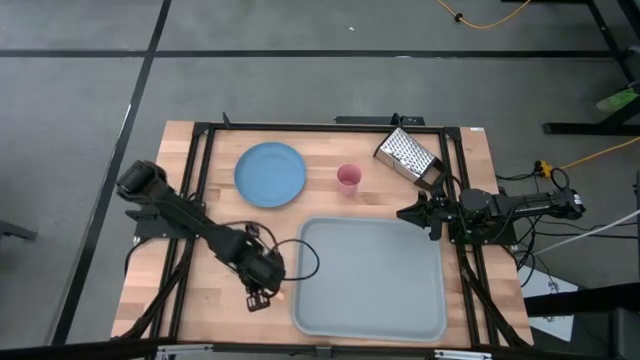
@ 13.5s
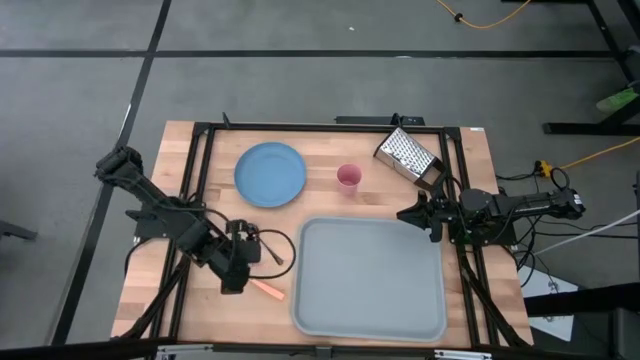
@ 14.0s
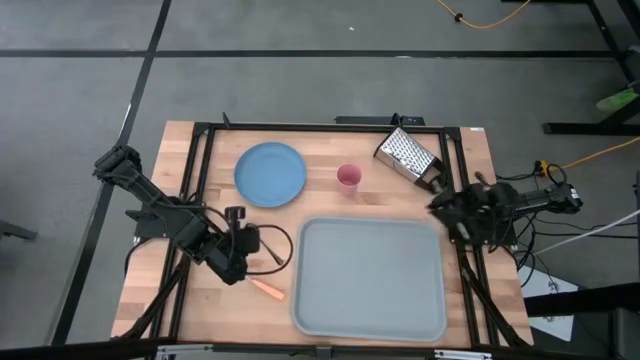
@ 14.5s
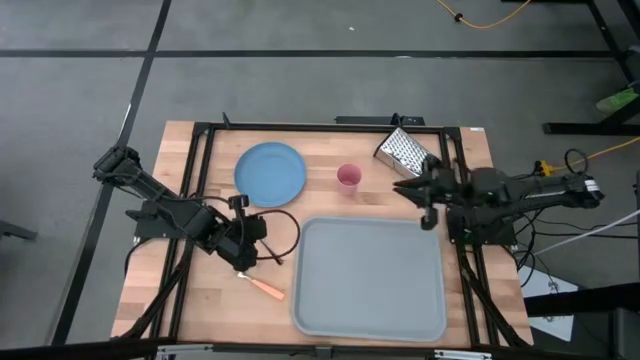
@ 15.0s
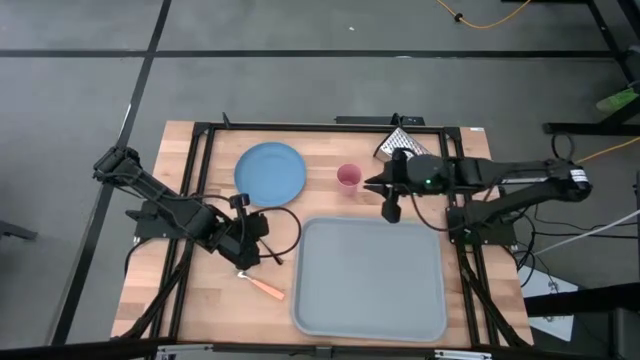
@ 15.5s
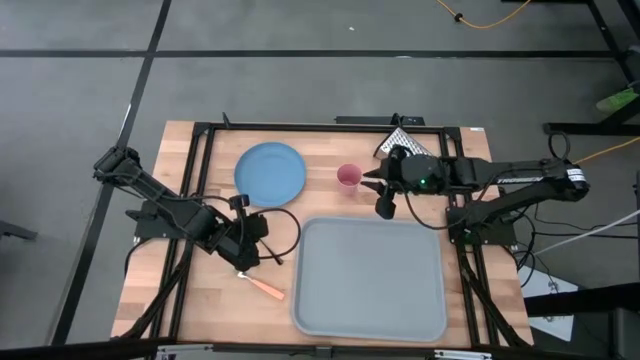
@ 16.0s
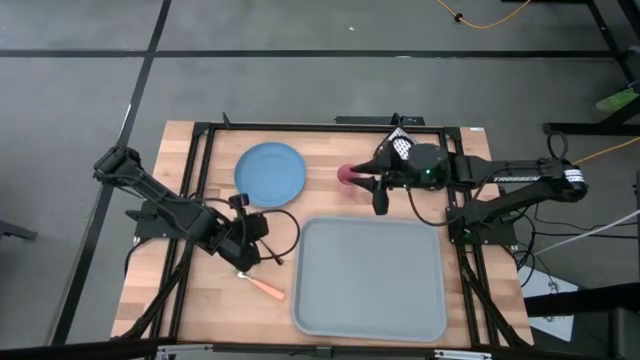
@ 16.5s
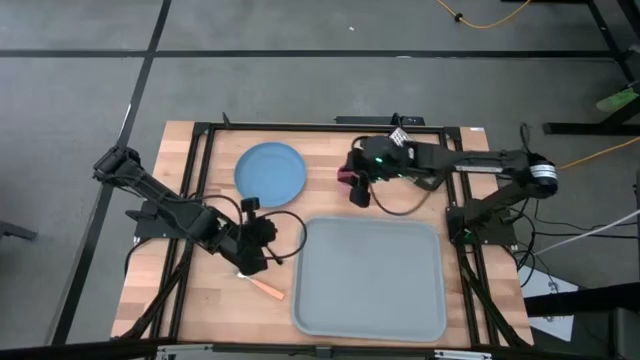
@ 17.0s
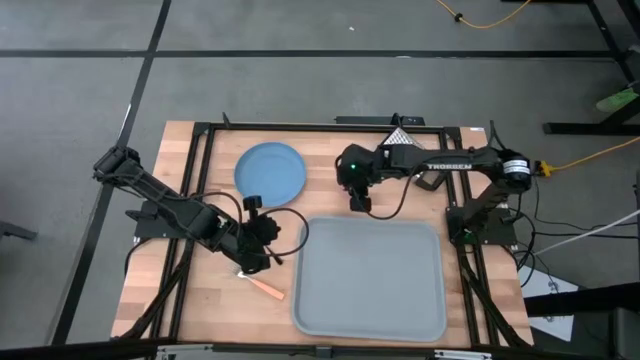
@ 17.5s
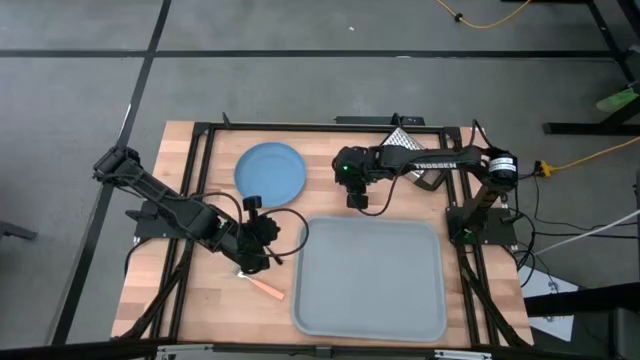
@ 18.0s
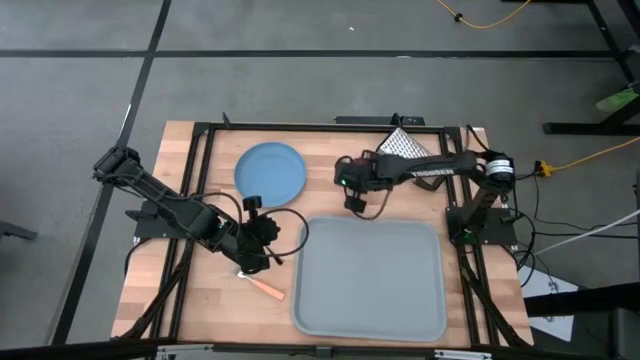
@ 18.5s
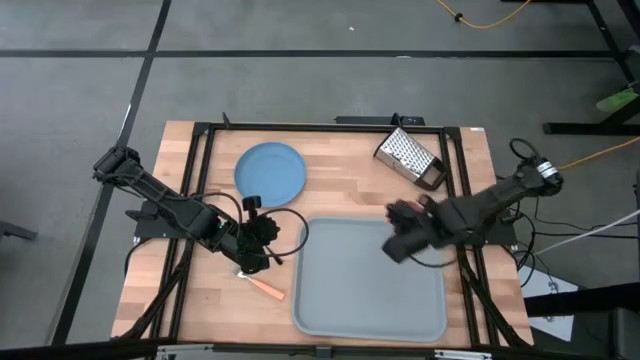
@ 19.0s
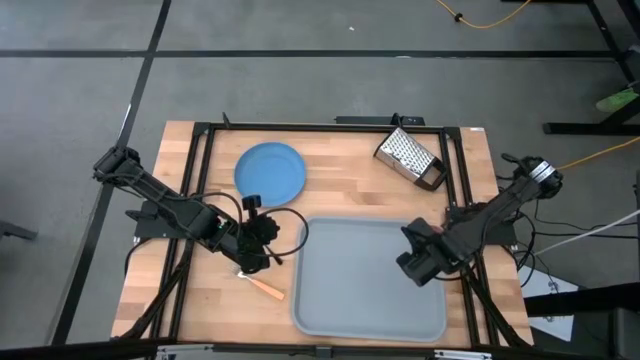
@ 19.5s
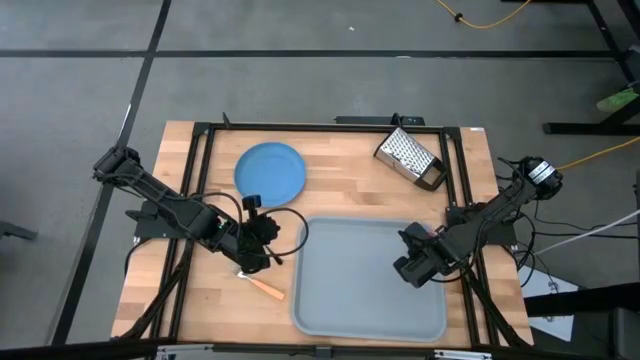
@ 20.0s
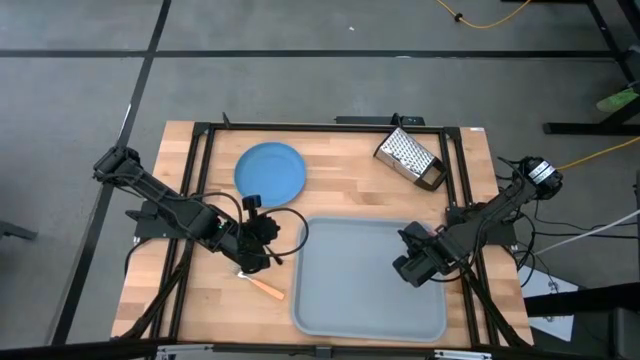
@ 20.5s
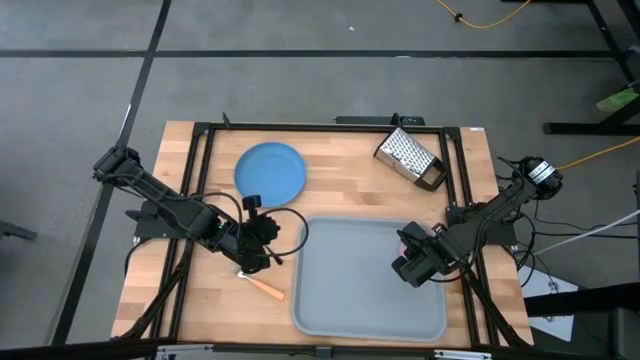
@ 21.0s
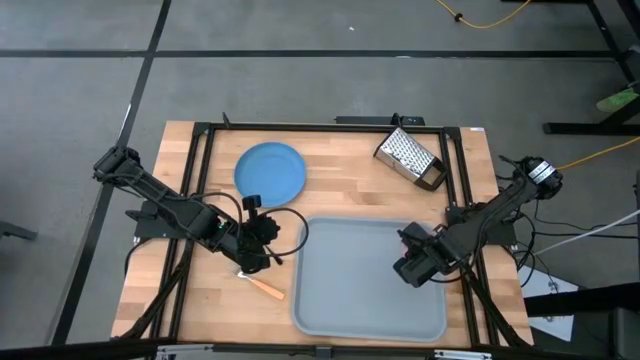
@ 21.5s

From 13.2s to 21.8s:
Task: Pick and place plate/cup/fork/spoon on tray
Put the pink cup to the top right of the gray tray

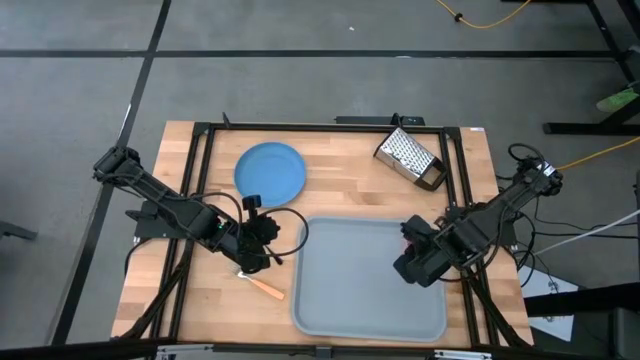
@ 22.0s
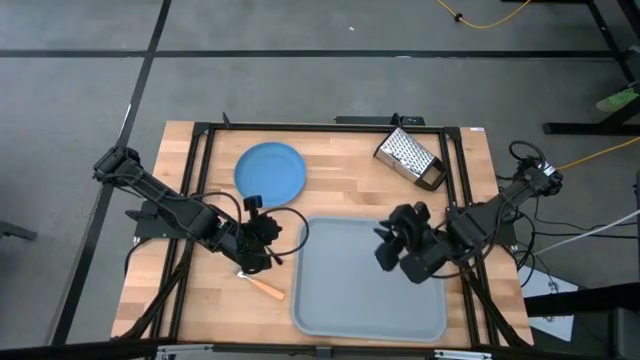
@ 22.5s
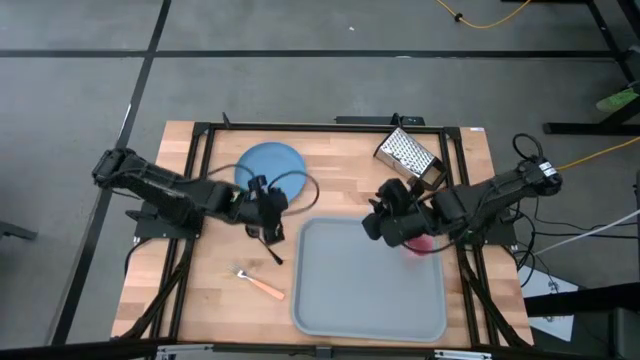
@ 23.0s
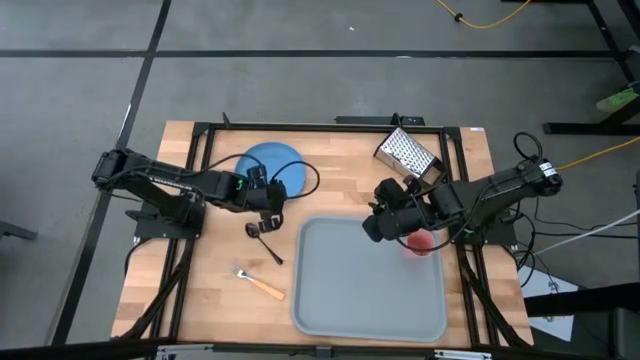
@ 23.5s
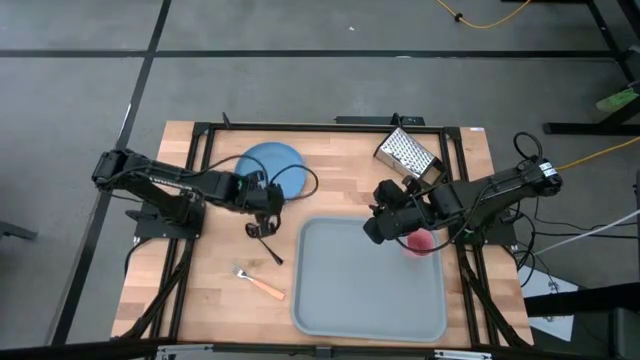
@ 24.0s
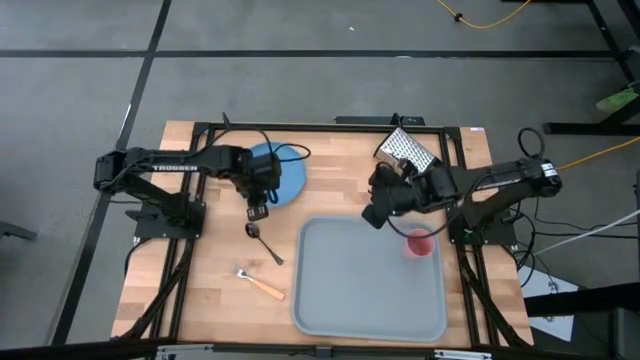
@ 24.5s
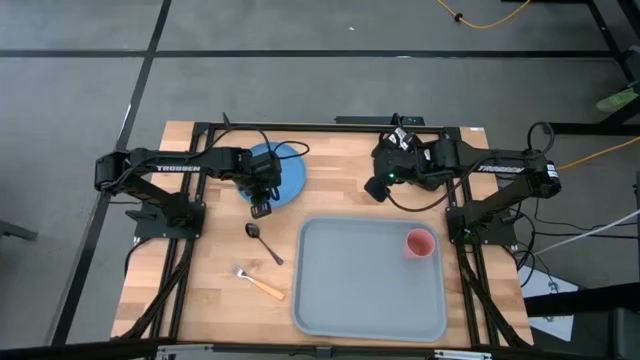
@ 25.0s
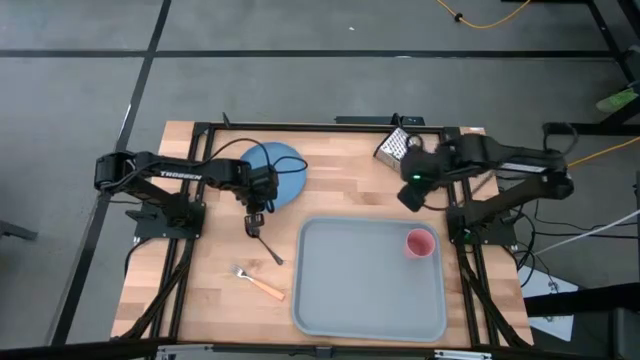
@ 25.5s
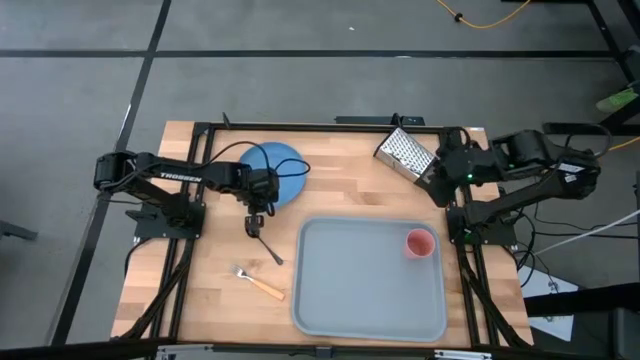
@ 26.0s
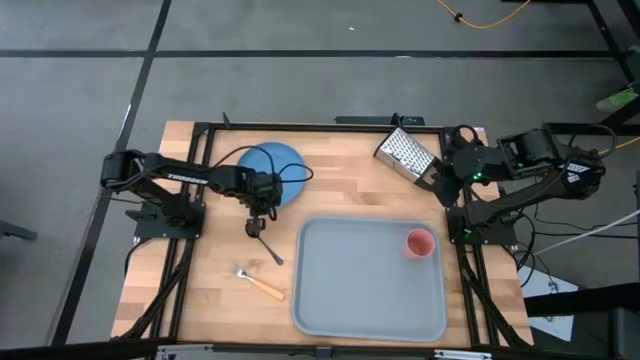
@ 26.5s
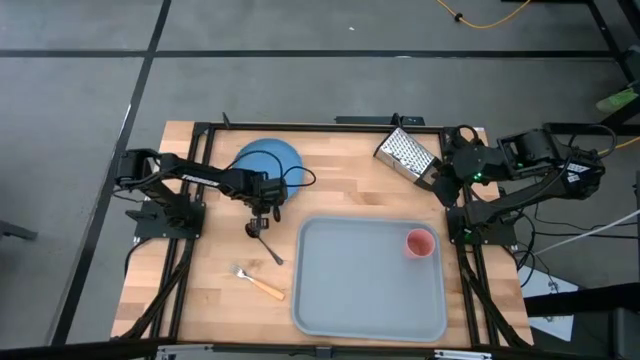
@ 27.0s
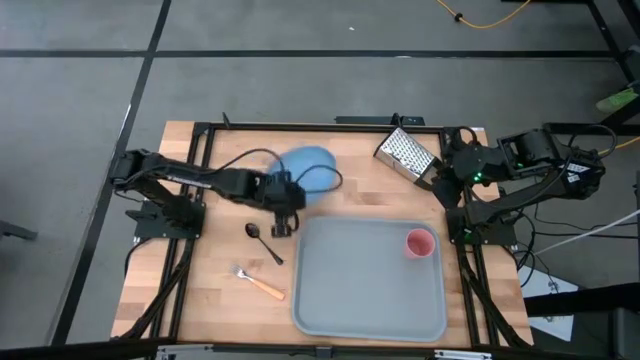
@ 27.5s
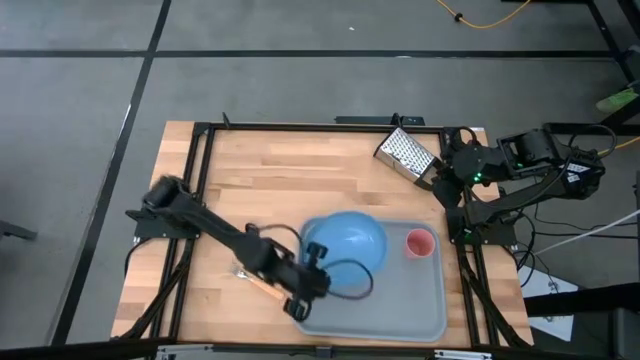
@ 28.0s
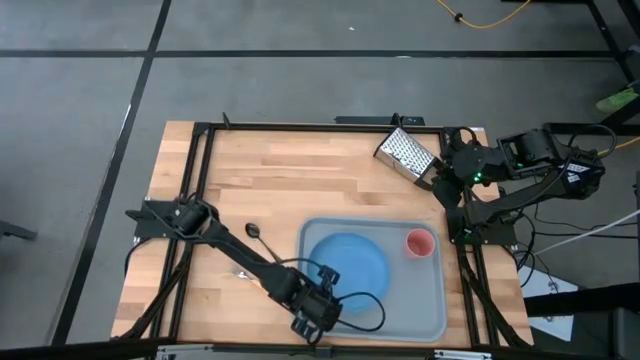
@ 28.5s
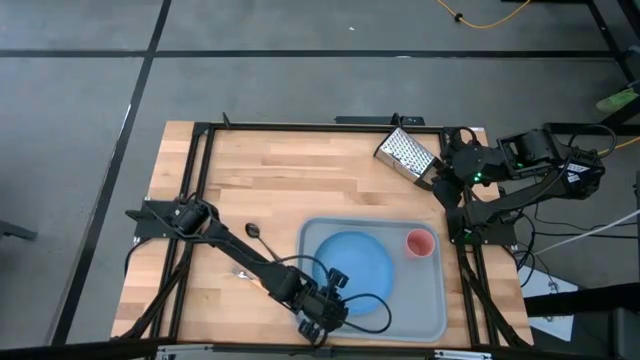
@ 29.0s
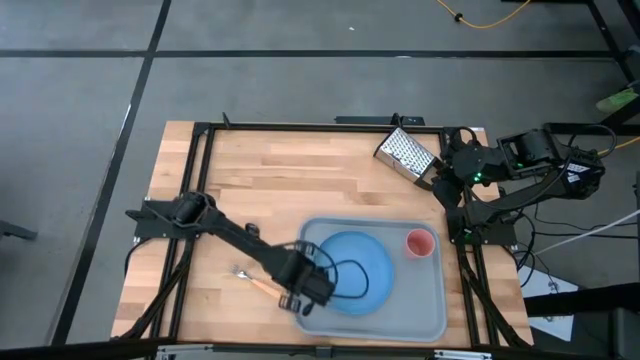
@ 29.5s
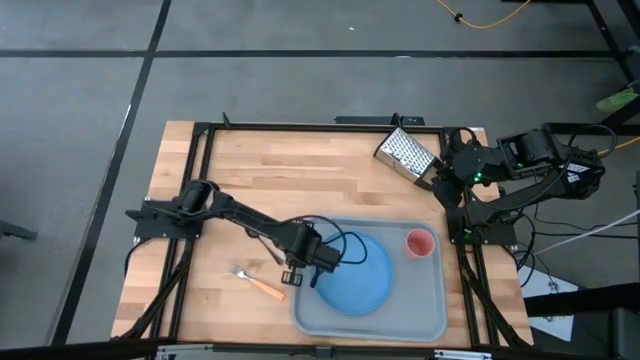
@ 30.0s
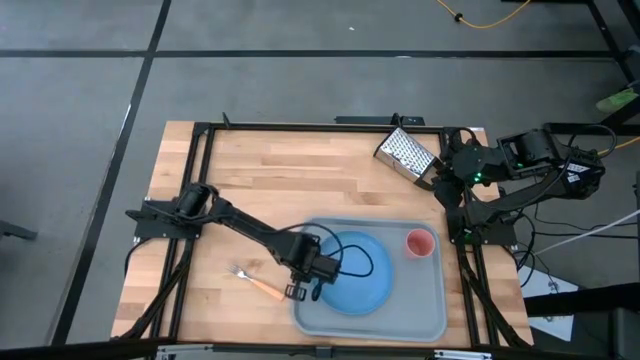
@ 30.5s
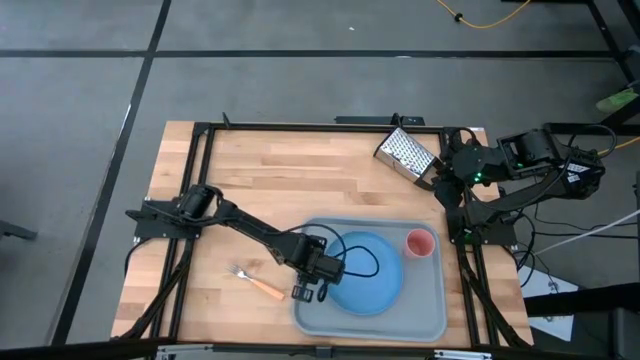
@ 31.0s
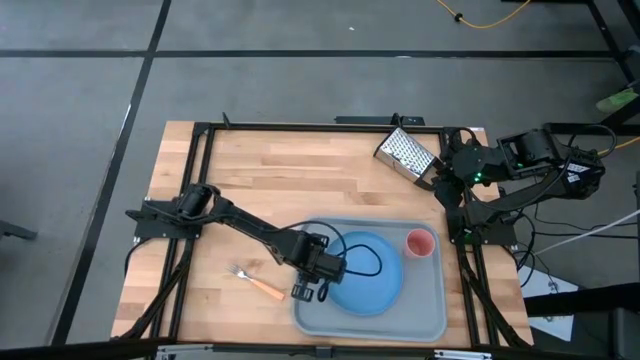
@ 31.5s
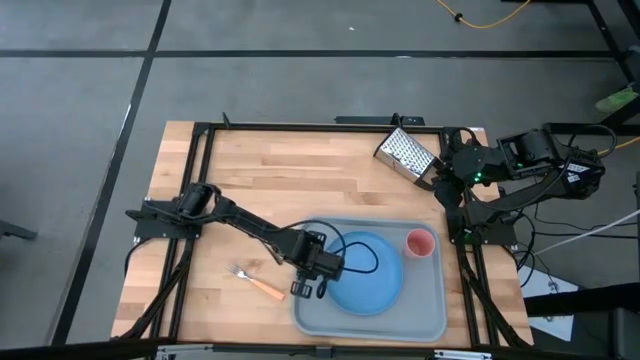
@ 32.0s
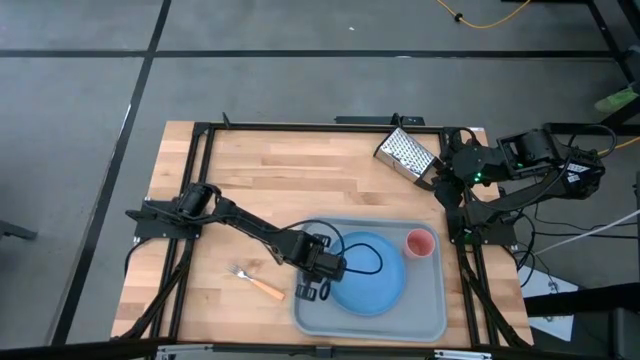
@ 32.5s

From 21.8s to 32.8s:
Put the blue plate on the center of the gray tray

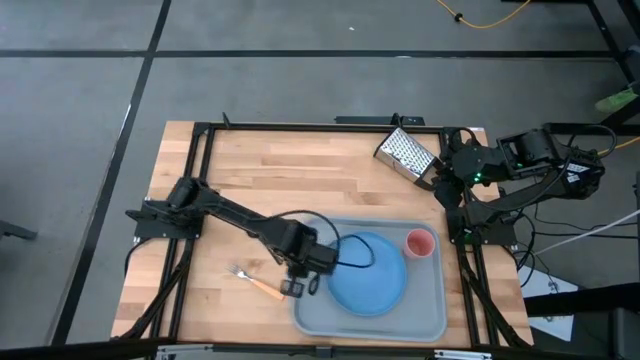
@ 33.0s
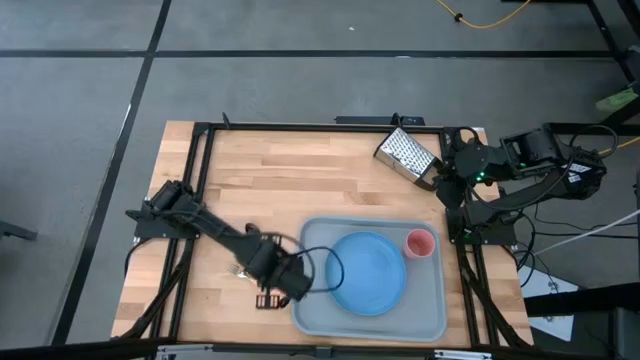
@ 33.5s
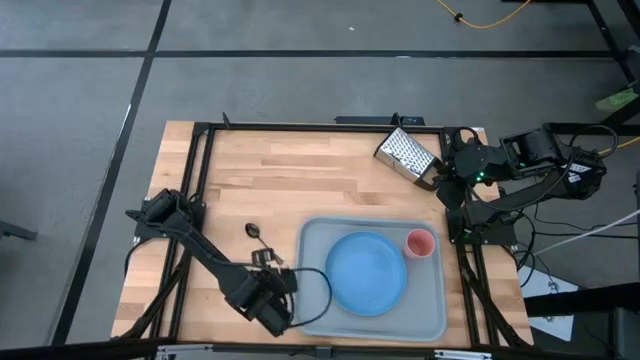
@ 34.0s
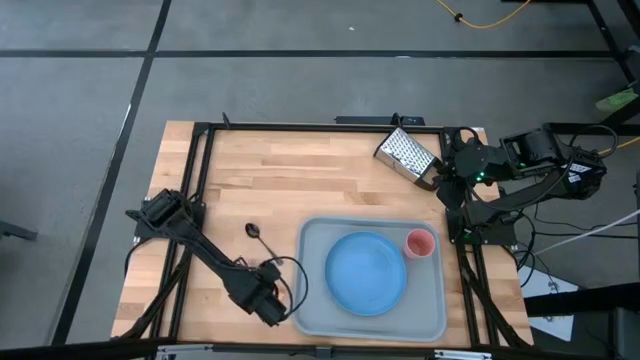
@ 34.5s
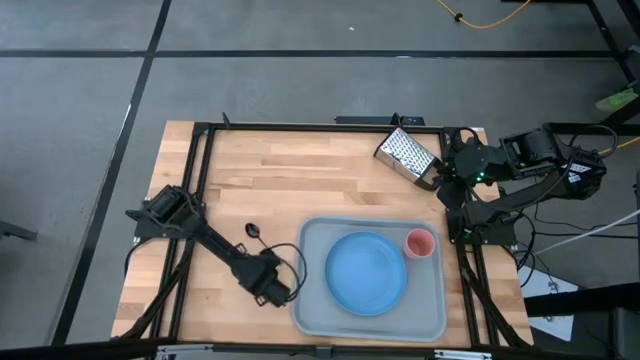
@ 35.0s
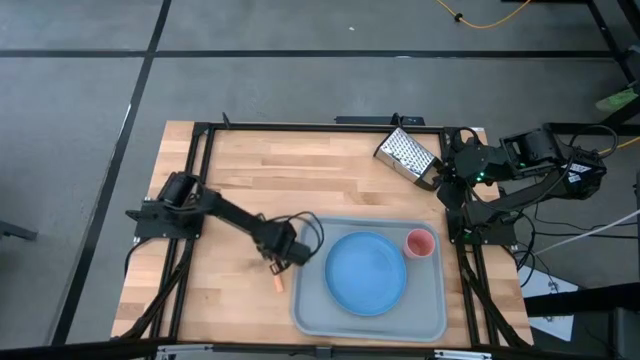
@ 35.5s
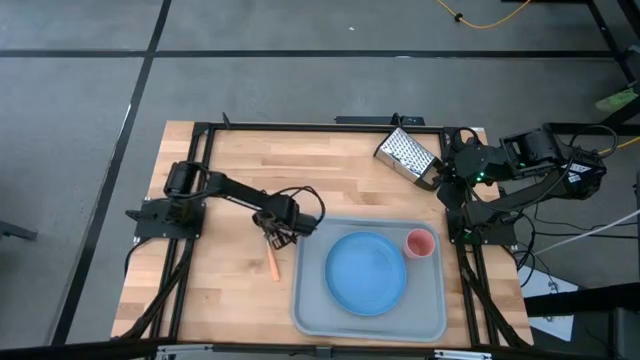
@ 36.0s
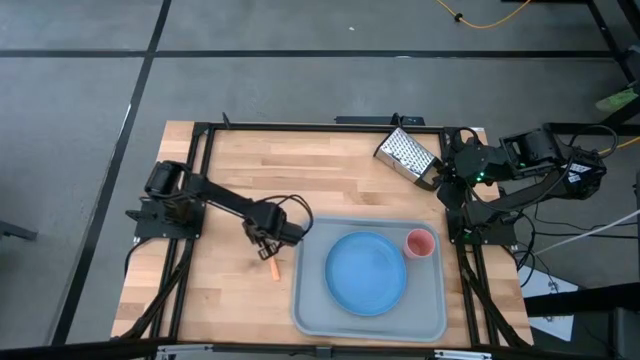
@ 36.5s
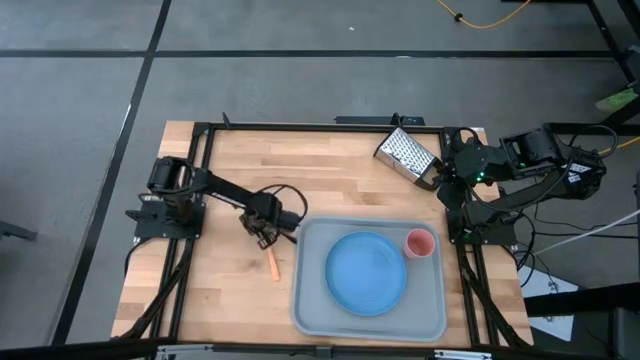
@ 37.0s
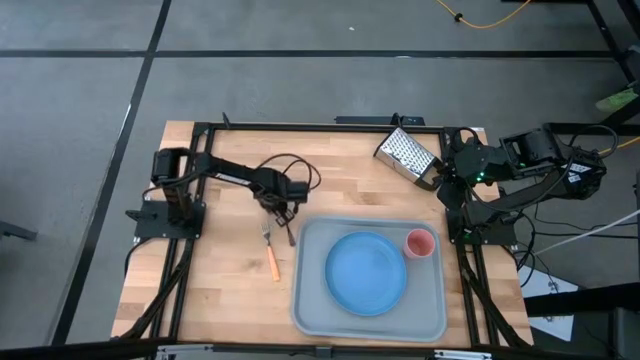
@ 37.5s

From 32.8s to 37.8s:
Adjust the silverware
